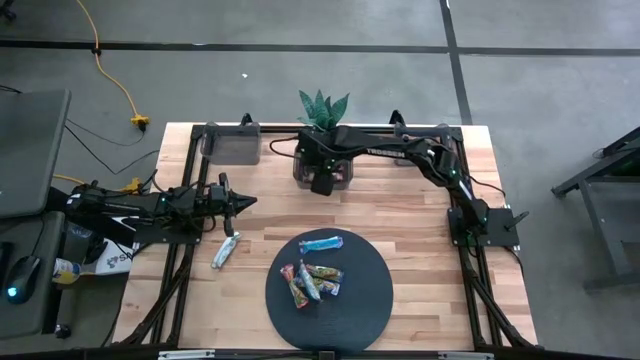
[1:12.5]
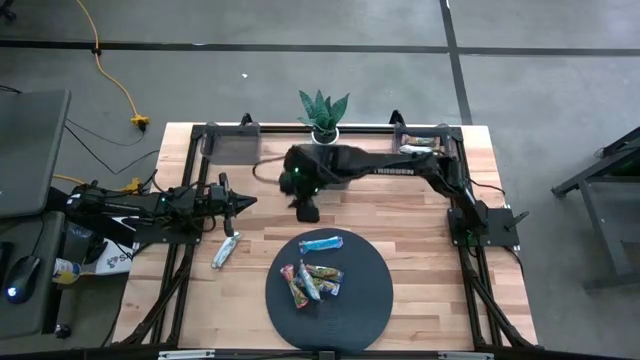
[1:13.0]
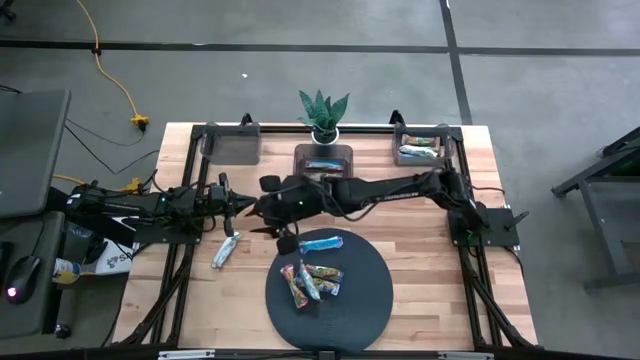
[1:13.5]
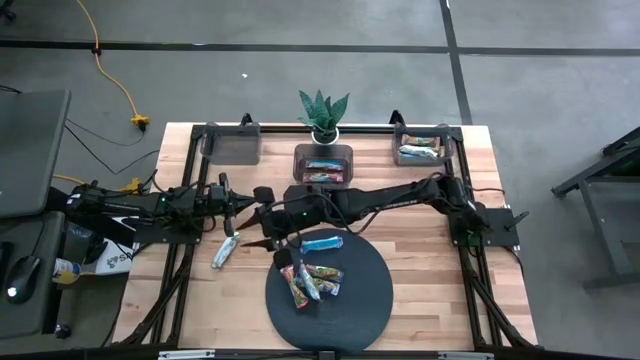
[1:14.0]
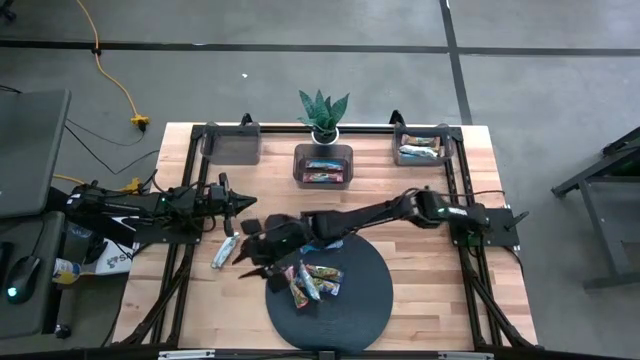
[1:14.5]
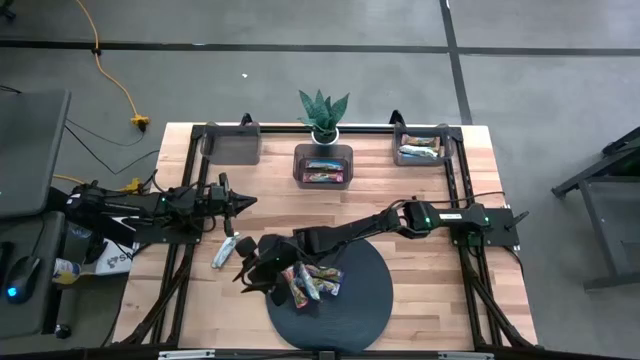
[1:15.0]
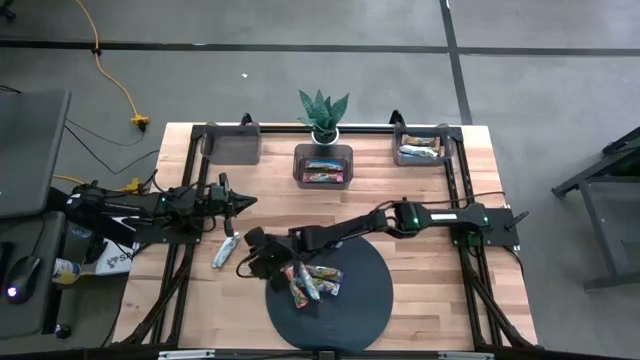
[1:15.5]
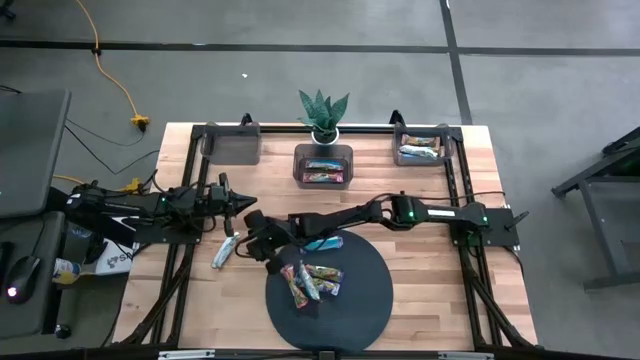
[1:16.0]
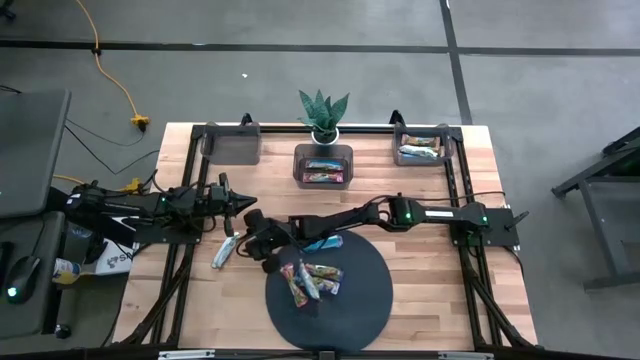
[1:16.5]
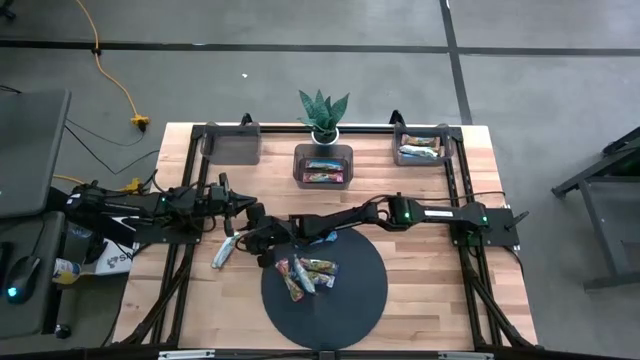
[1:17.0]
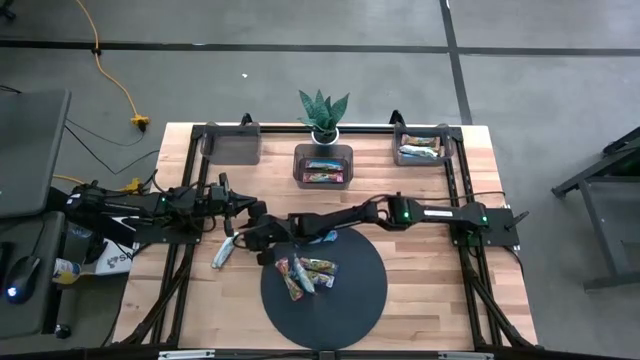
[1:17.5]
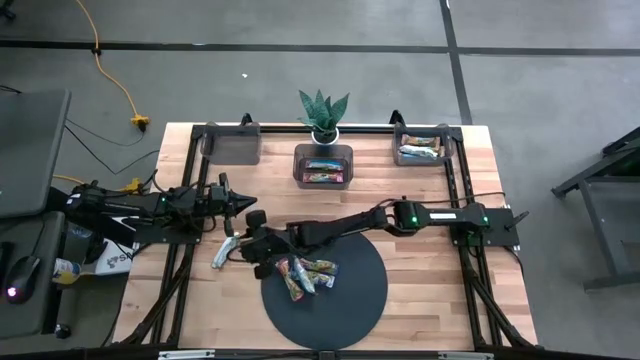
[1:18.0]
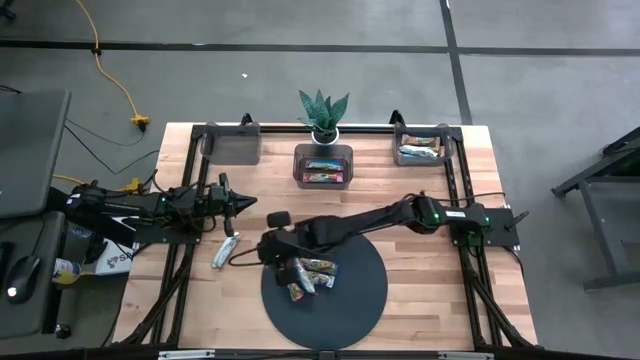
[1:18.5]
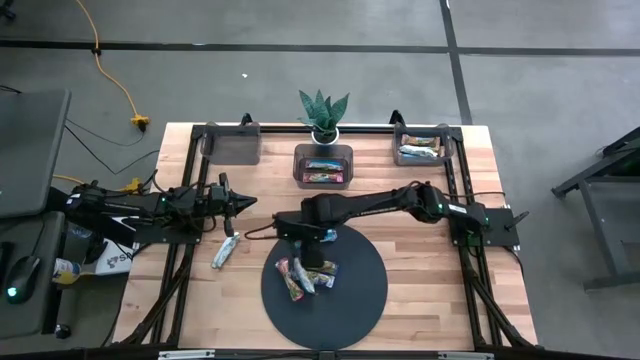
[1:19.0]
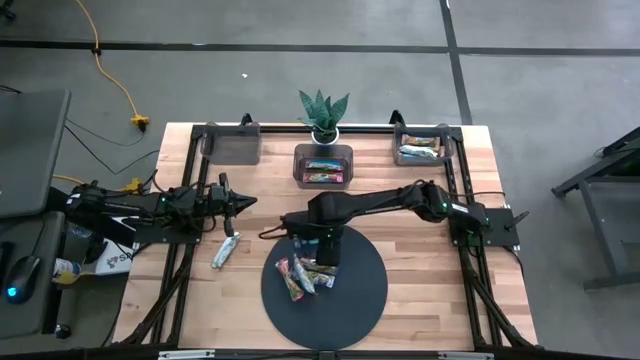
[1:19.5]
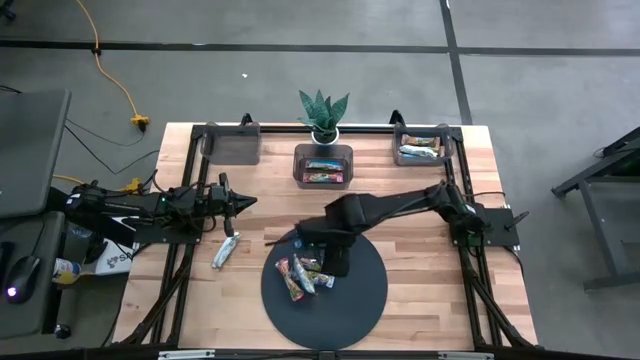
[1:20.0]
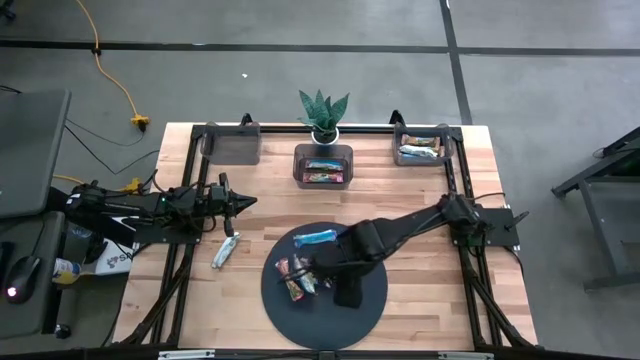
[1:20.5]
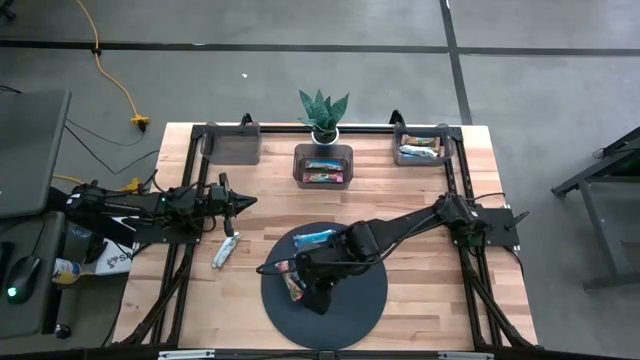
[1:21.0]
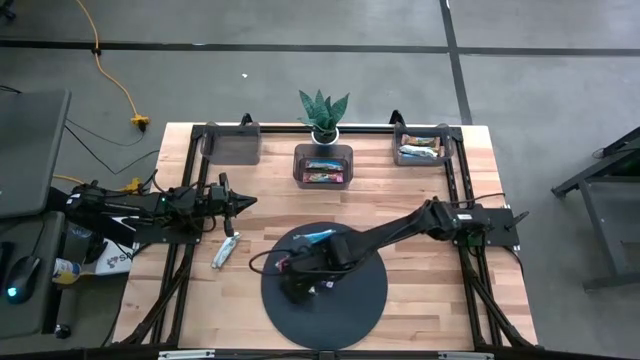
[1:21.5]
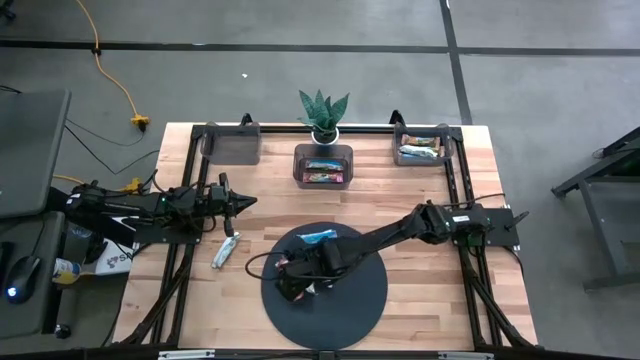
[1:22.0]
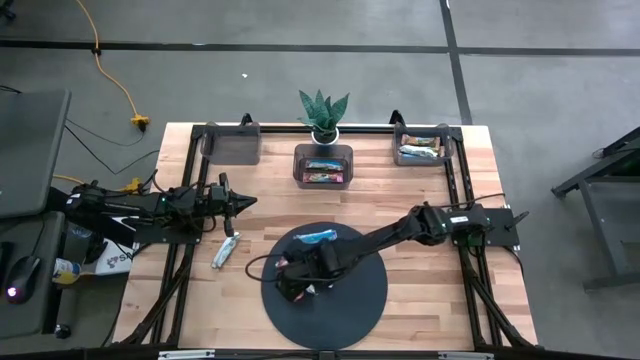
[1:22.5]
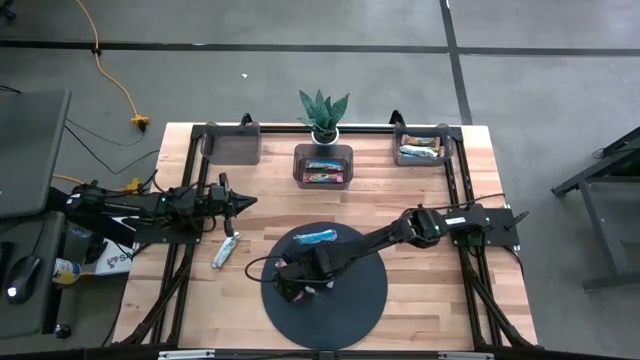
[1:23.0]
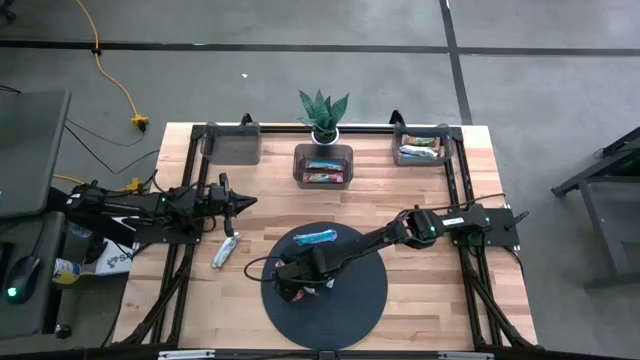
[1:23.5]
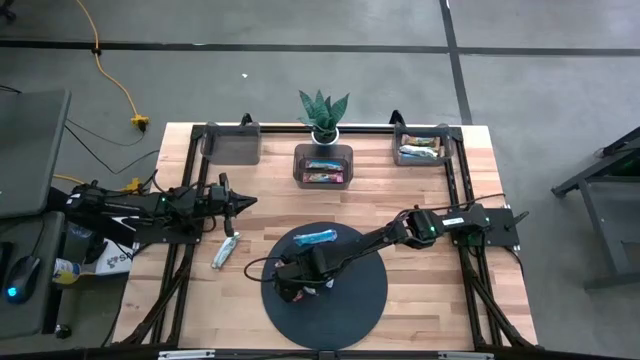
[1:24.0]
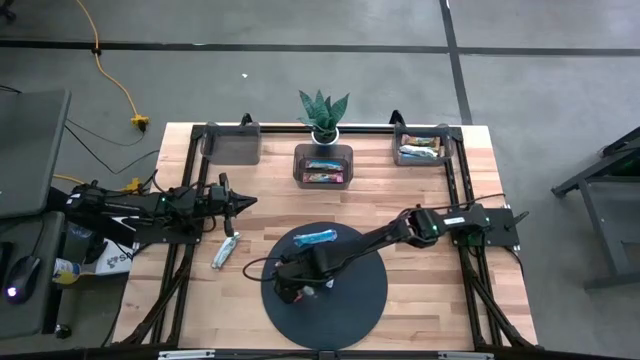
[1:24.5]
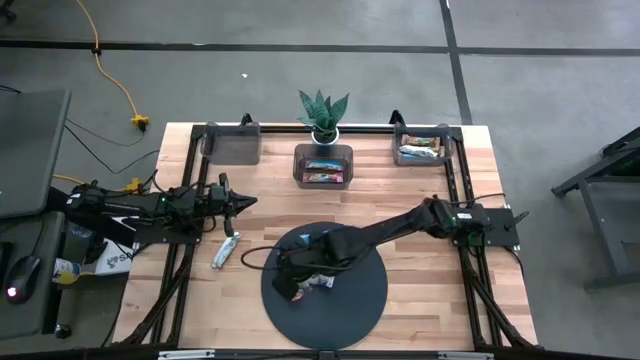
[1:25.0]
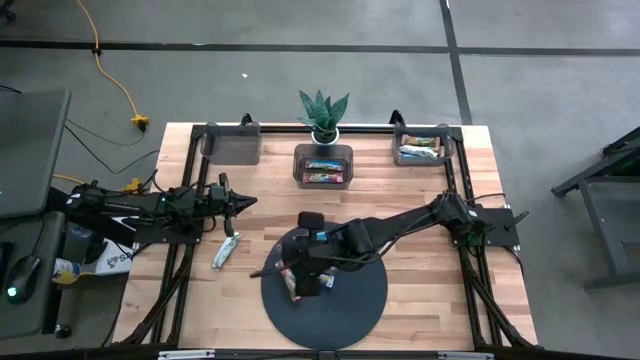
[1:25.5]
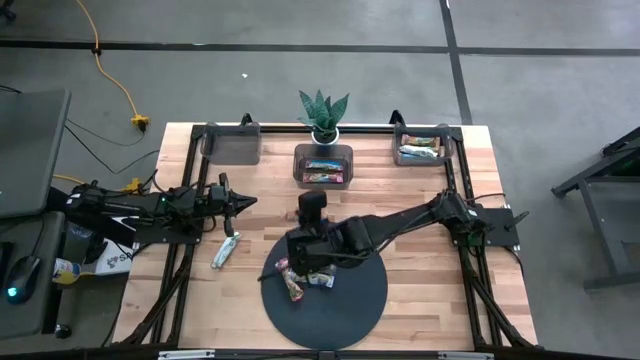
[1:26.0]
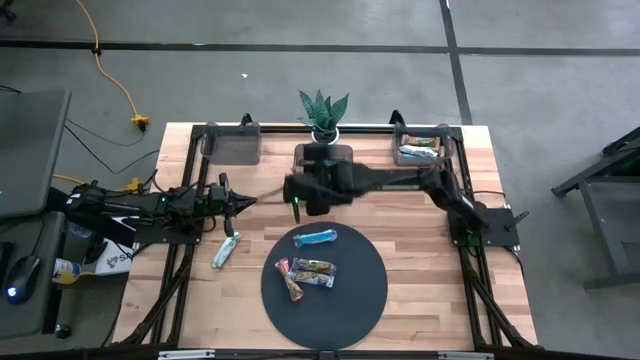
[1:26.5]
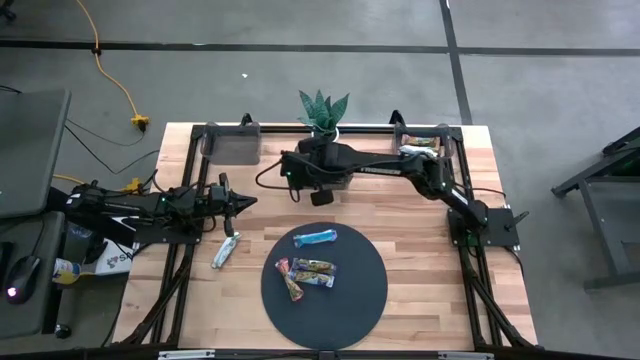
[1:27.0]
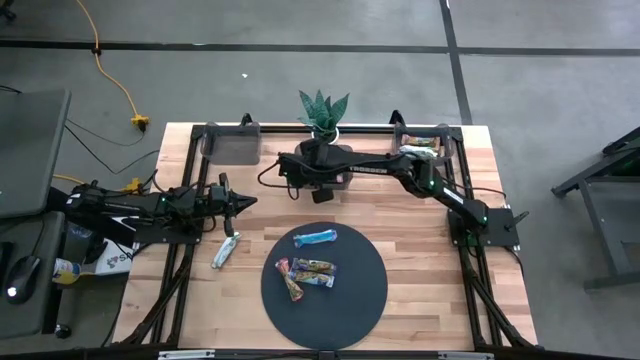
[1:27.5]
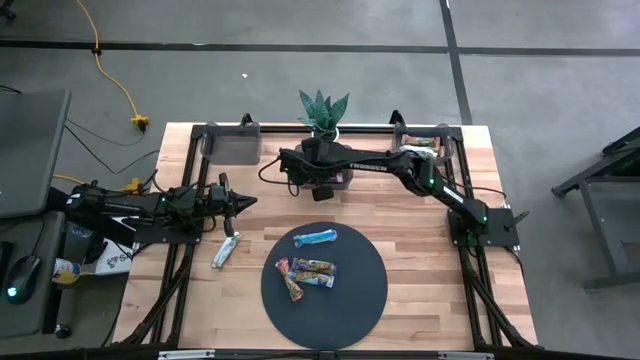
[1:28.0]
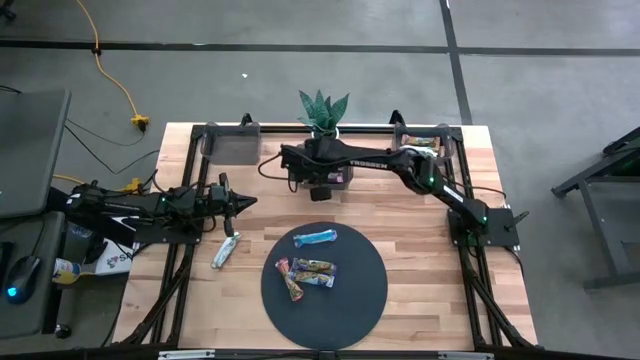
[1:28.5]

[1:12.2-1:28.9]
Task: Pick and place Granola Bars by type
Put the red granola bar into the middle black bin

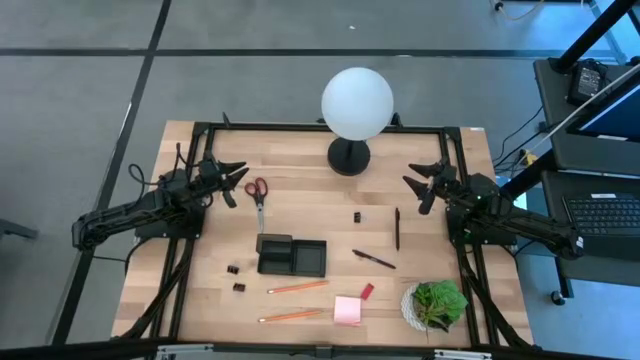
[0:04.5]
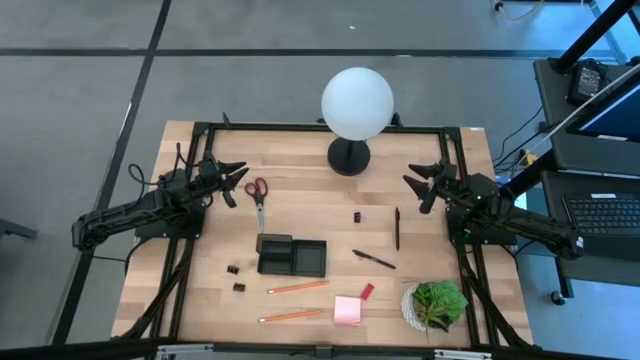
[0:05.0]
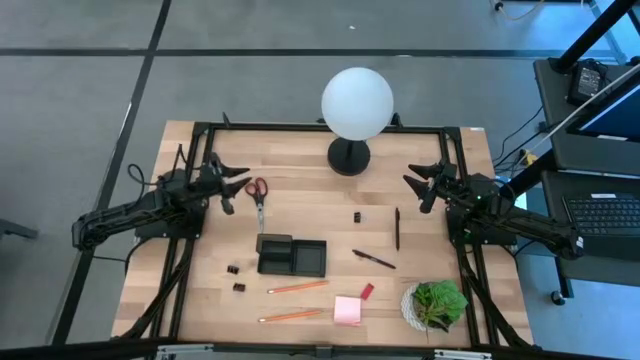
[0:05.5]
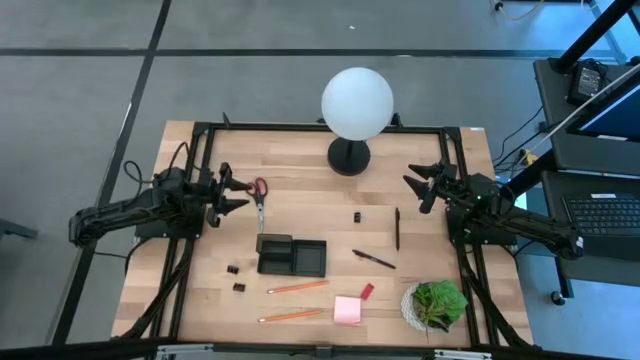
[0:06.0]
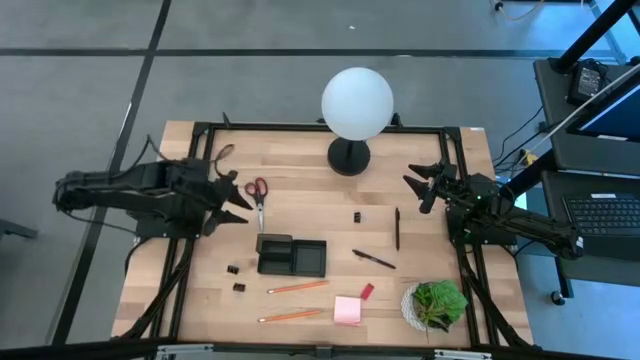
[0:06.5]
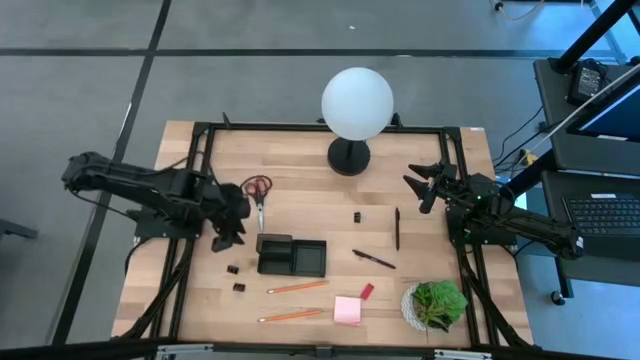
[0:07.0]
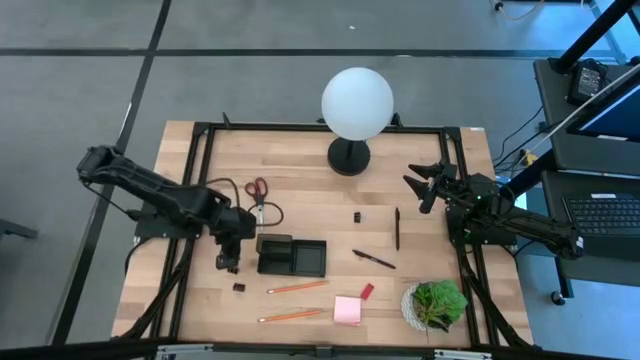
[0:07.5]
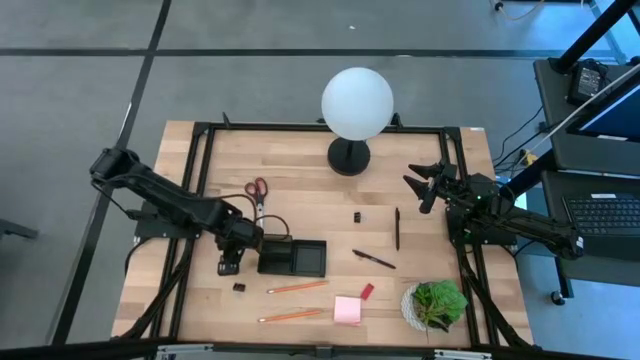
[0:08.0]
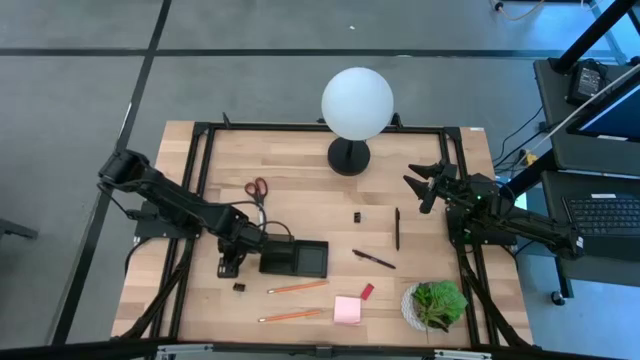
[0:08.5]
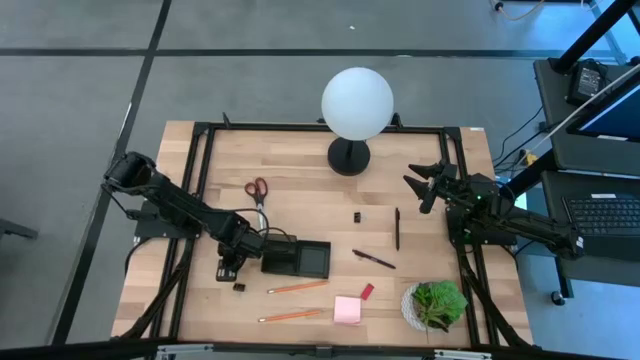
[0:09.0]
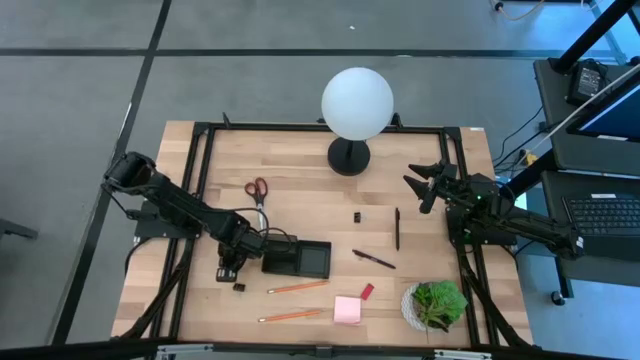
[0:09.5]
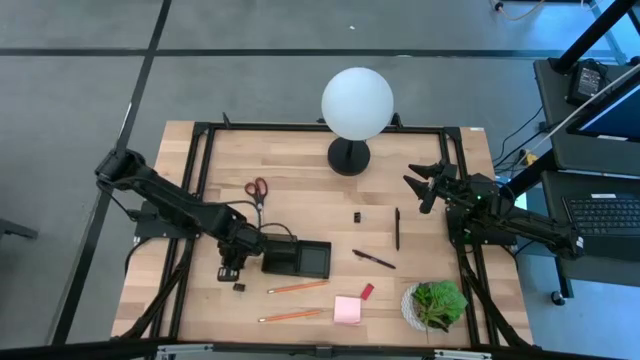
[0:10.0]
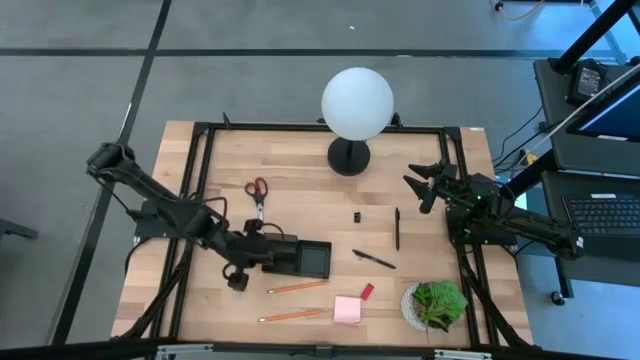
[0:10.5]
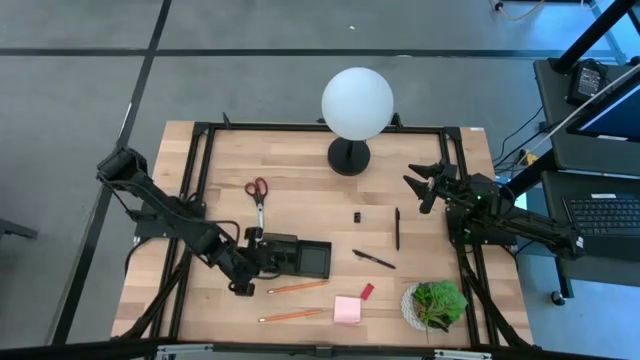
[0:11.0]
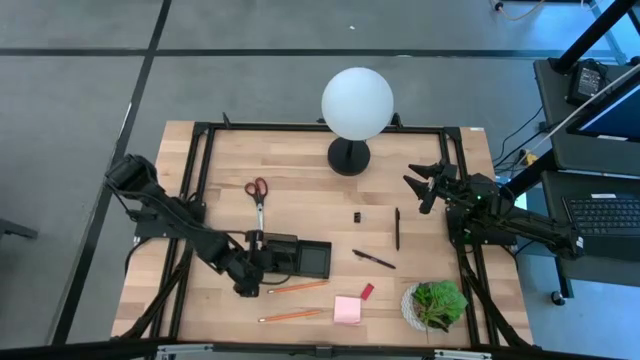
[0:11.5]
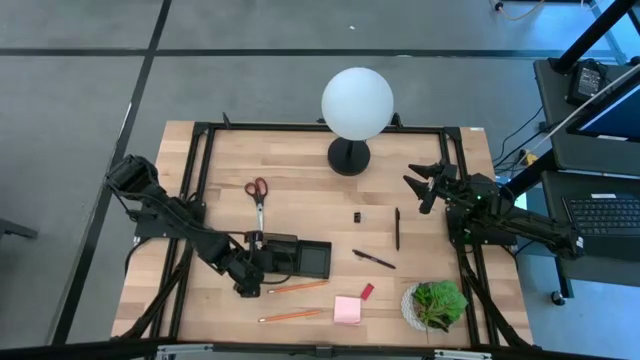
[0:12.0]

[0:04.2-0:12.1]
Task: Pick and place office supplies into organizer
Put the middle black binder clip into the black desk organizer
